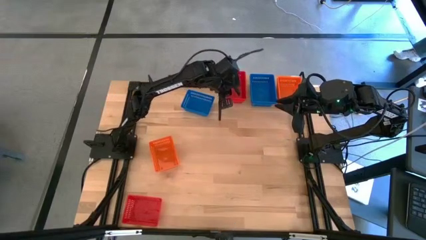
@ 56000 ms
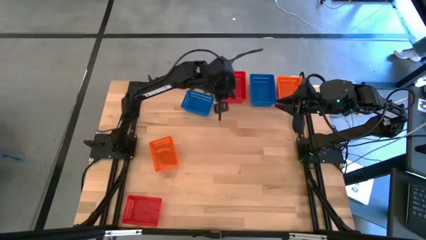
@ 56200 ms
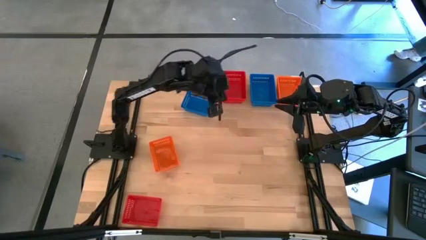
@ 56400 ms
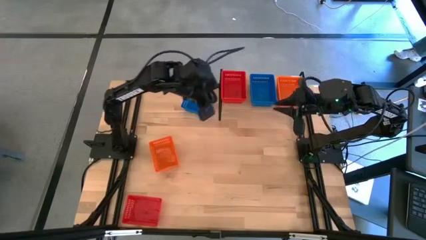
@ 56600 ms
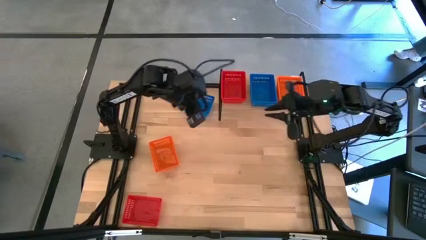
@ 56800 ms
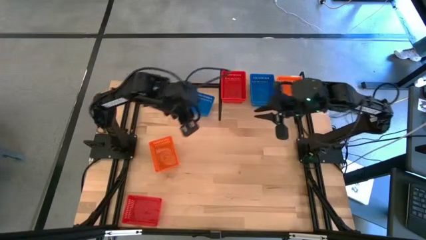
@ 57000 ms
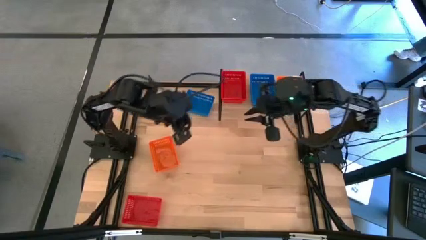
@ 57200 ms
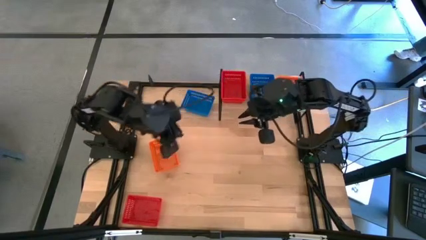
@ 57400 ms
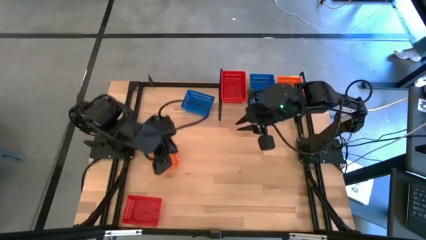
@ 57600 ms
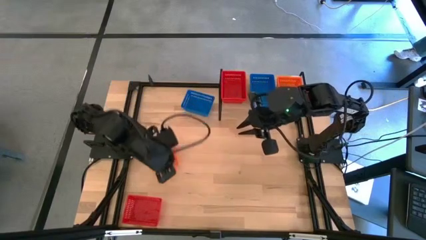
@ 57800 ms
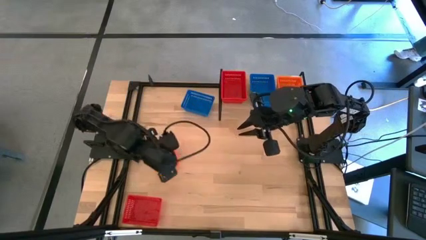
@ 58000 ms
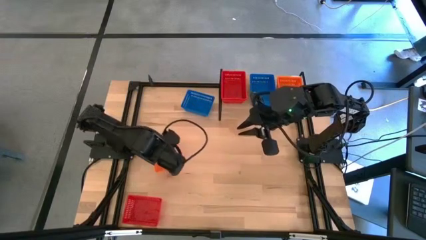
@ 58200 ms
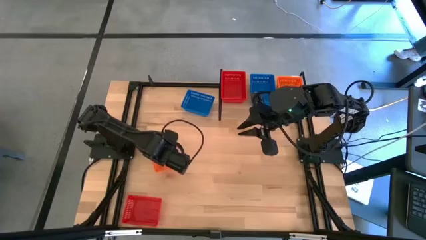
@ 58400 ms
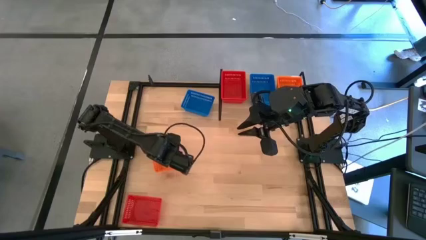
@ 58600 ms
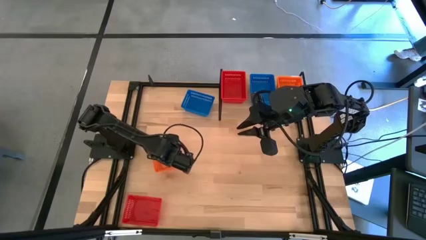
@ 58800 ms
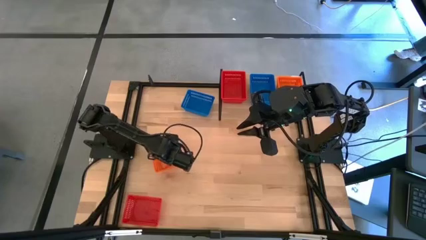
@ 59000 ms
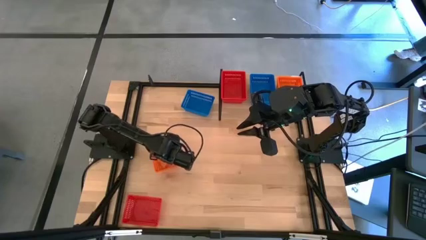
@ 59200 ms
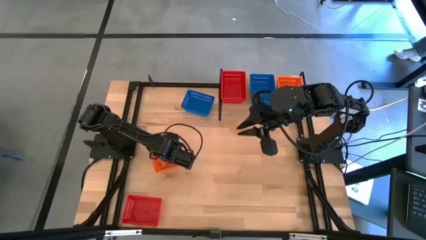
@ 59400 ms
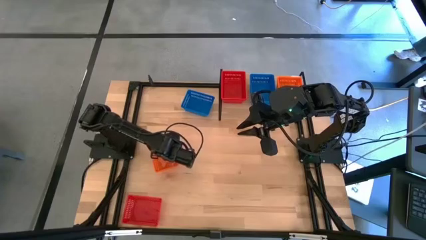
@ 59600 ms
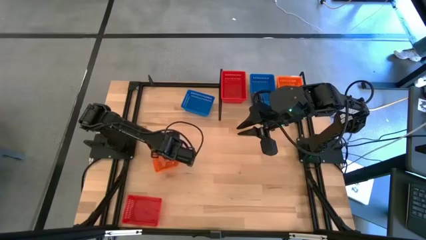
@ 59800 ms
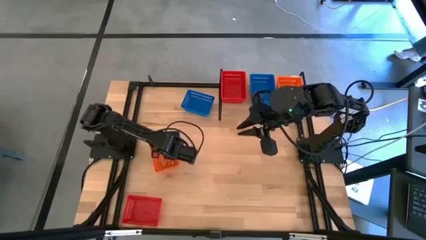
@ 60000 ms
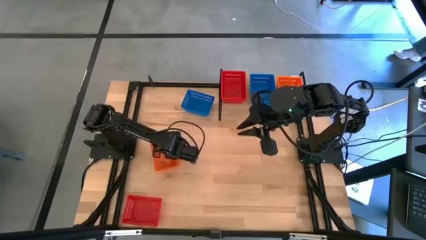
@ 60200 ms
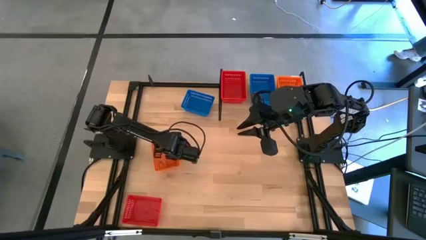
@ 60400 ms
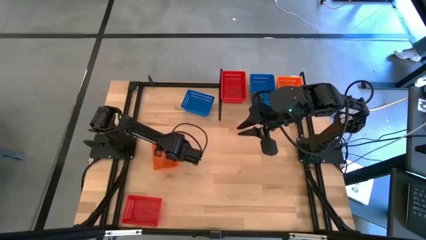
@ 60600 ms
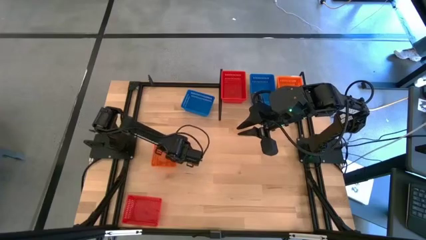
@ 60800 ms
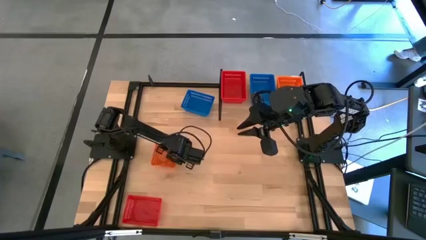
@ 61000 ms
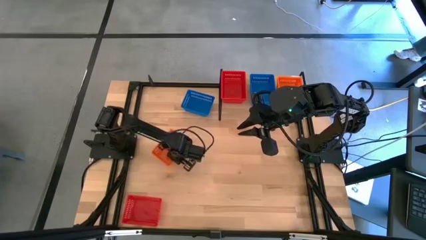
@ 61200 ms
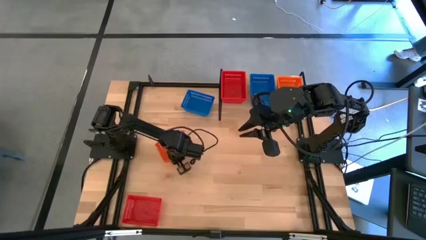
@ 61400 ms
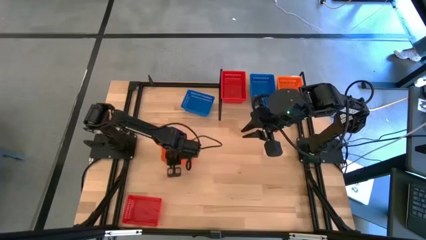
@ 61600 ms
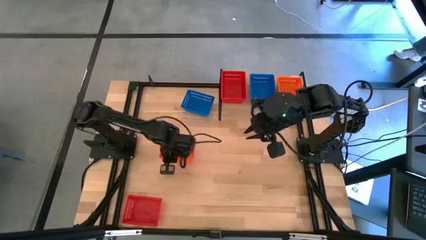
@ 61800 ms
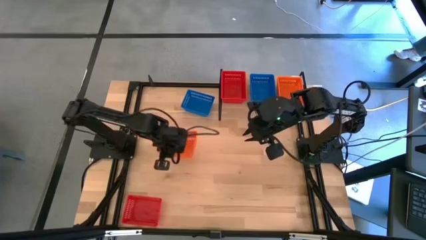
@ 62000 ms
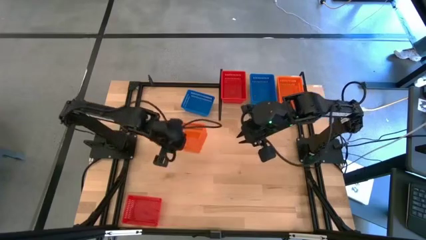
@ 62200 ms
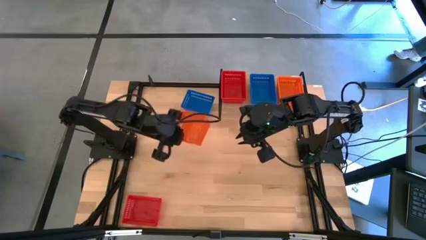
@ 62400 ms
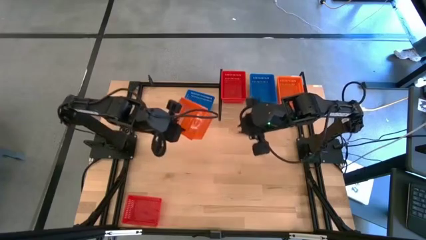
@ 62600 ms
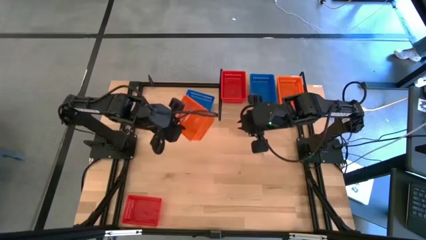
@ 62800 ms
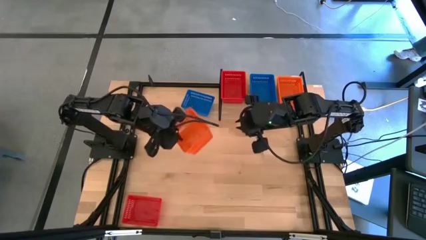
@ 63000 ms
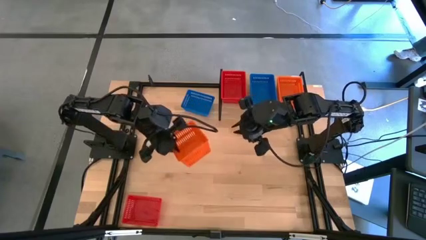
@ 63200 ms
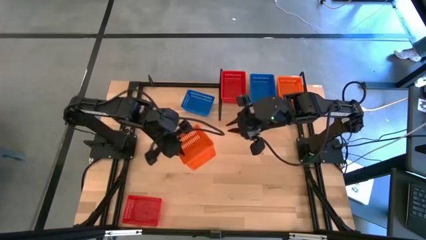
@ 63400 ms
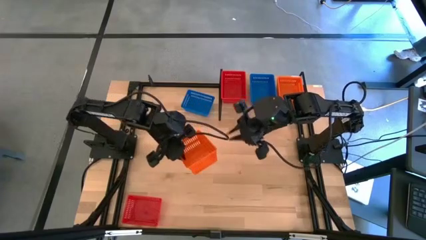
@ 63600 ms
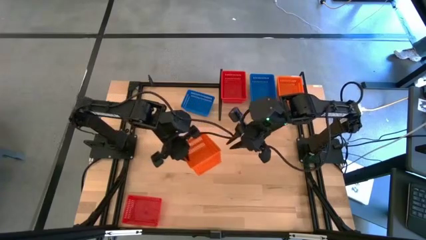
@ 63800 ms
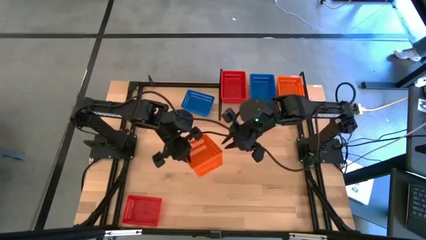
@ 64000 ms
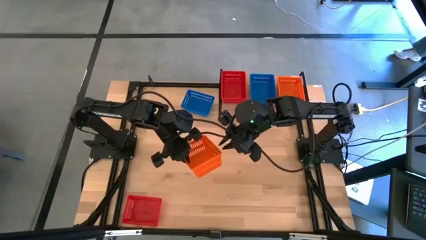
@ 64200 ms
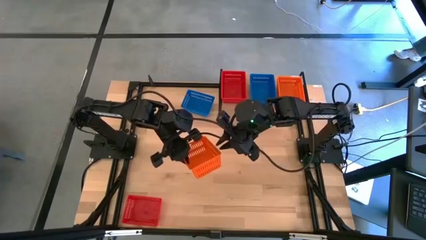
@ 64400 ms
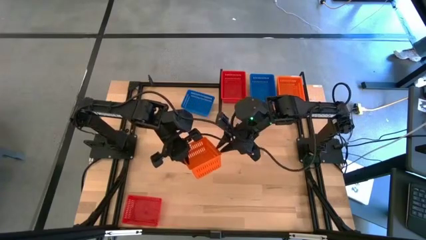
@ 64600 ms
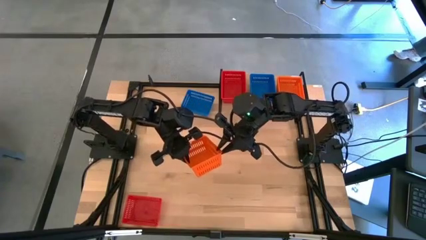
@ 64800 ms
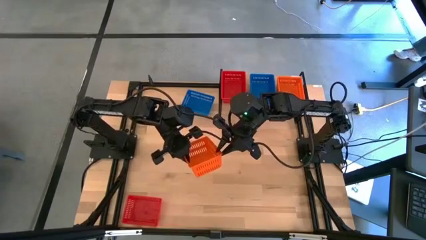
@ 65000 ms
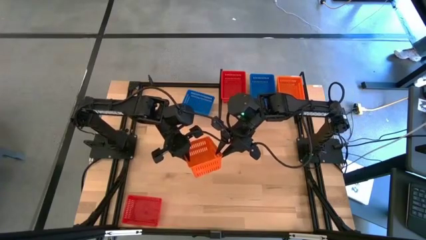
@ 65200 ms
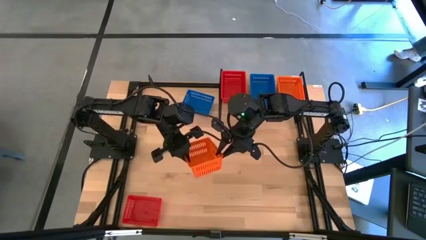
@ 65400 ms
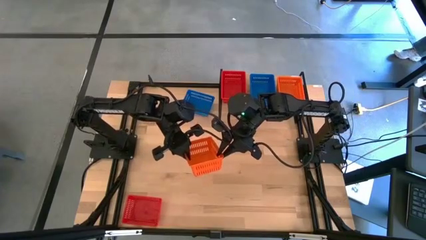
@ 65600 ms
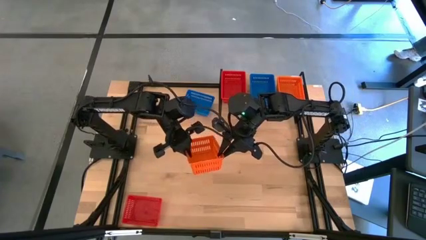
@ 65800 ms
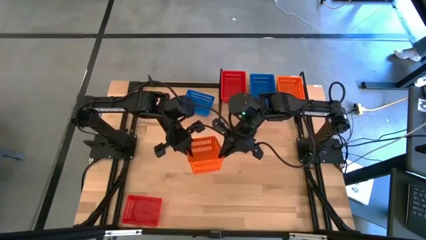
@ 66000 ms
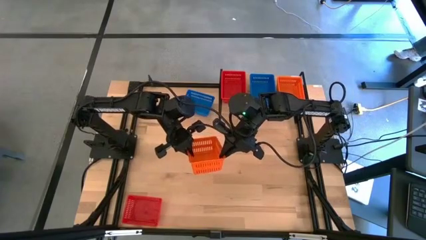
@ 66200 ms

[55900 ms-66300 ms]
Task: Stack baskets on shelf by color
Stack the orange bin on top of the stacked orange bins on the shelf

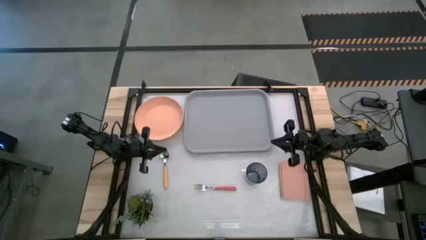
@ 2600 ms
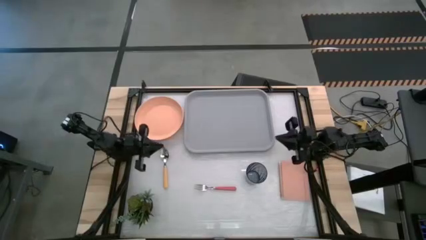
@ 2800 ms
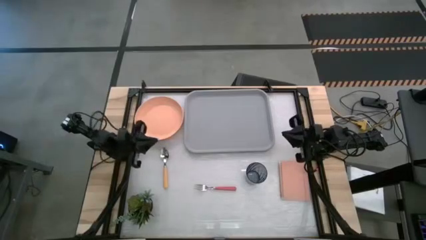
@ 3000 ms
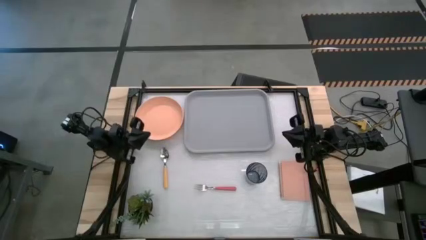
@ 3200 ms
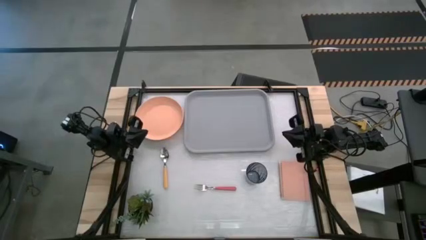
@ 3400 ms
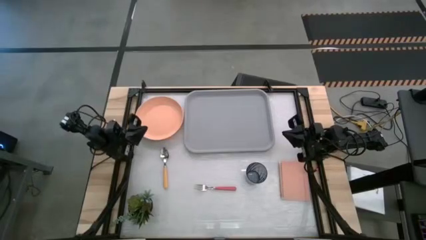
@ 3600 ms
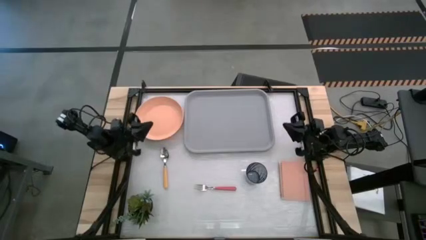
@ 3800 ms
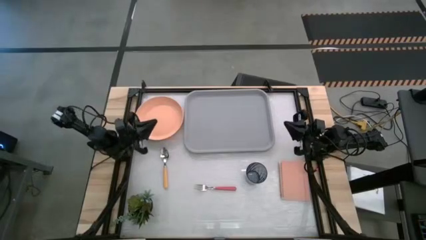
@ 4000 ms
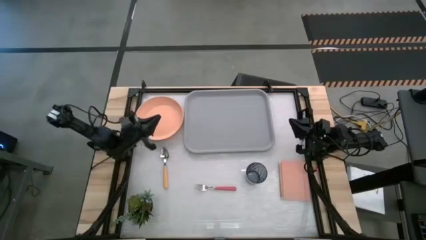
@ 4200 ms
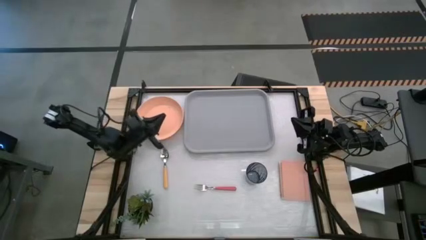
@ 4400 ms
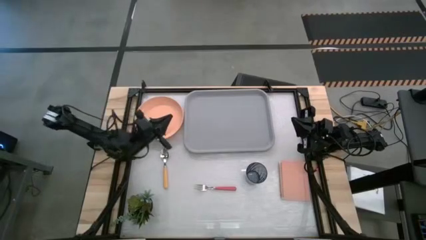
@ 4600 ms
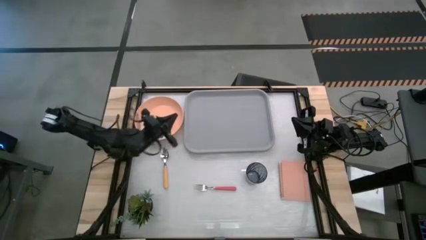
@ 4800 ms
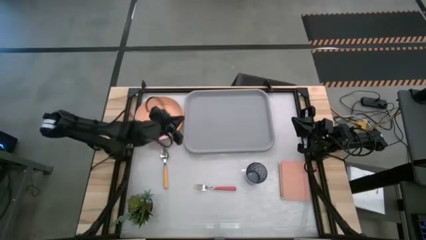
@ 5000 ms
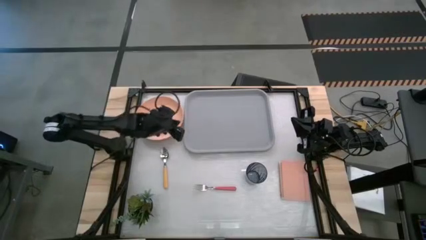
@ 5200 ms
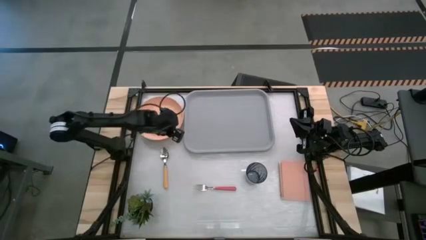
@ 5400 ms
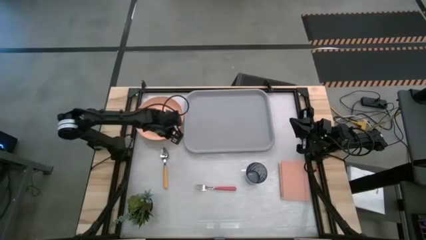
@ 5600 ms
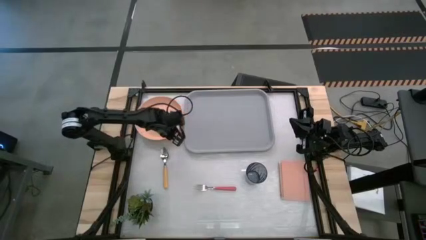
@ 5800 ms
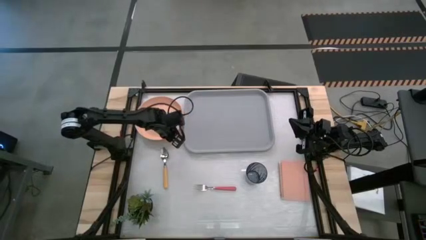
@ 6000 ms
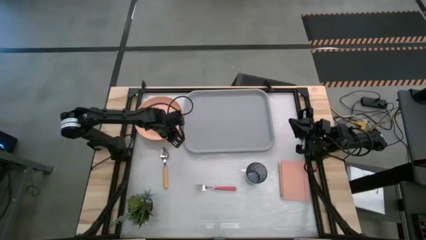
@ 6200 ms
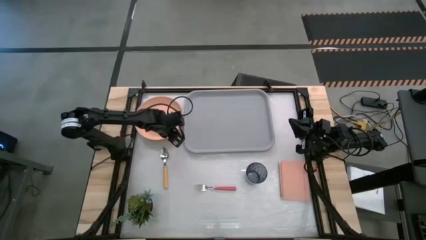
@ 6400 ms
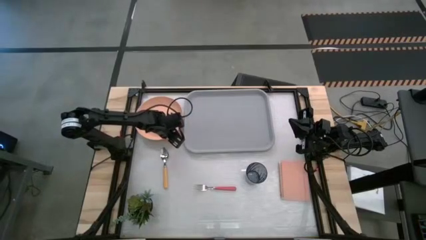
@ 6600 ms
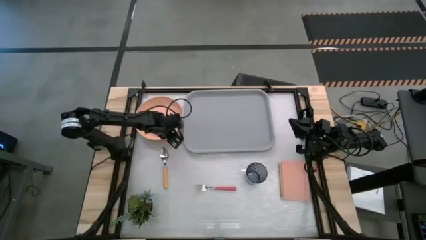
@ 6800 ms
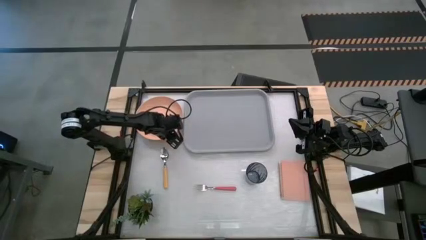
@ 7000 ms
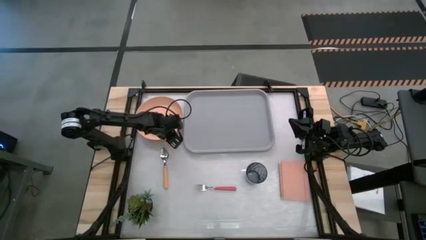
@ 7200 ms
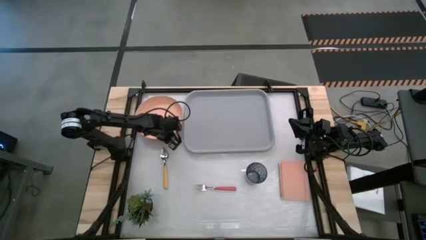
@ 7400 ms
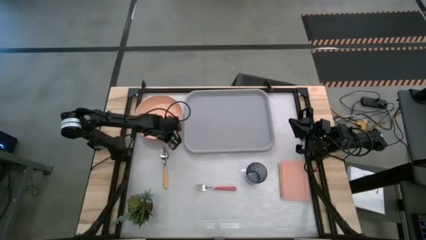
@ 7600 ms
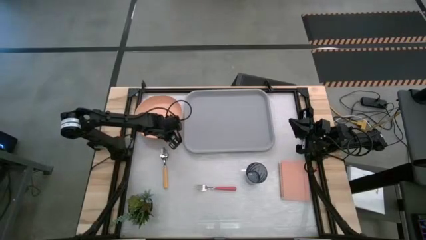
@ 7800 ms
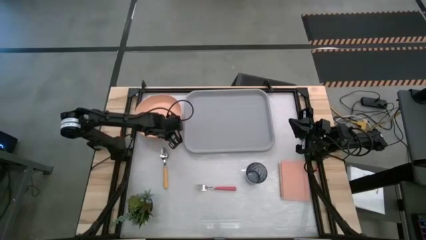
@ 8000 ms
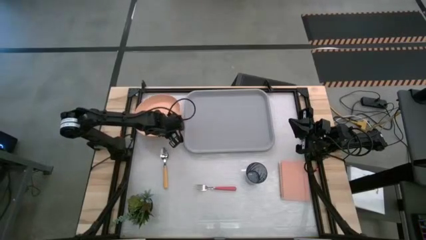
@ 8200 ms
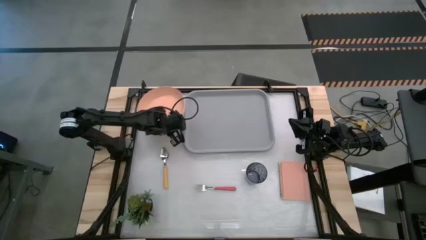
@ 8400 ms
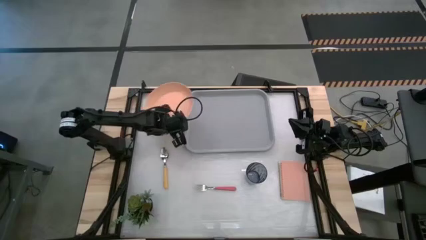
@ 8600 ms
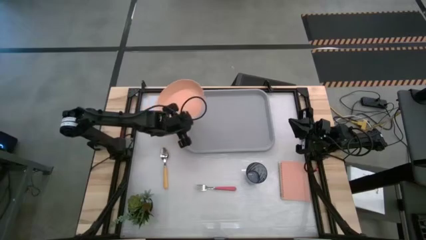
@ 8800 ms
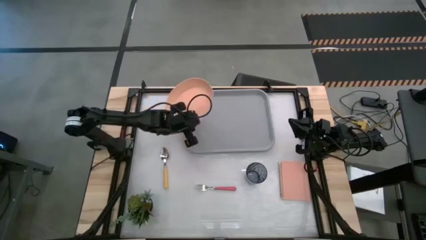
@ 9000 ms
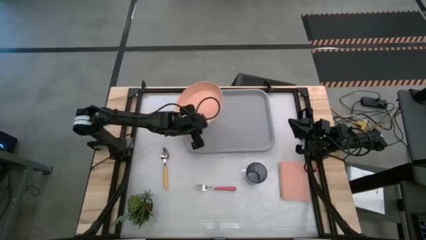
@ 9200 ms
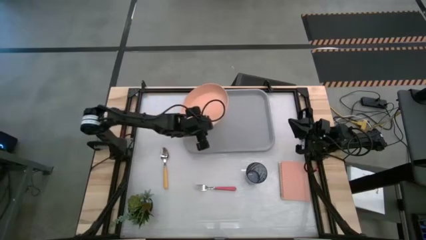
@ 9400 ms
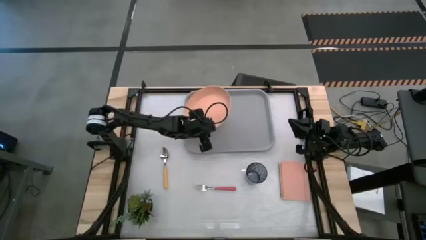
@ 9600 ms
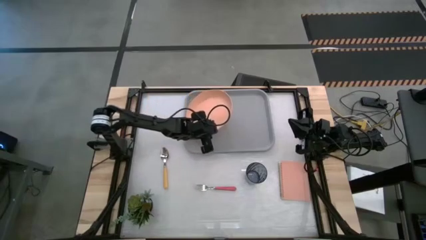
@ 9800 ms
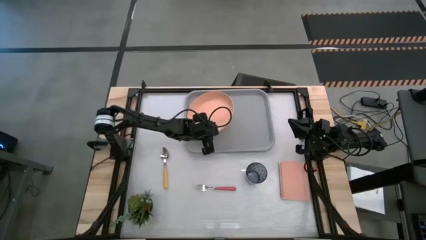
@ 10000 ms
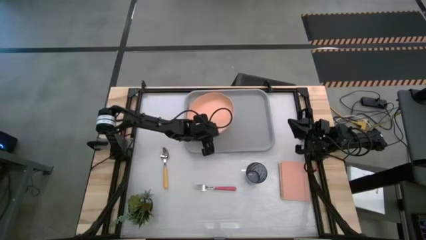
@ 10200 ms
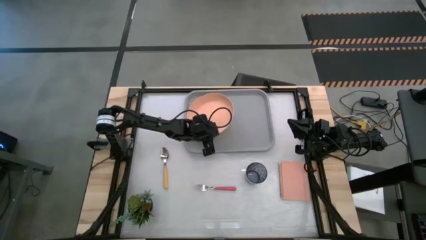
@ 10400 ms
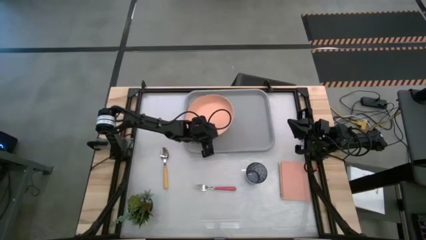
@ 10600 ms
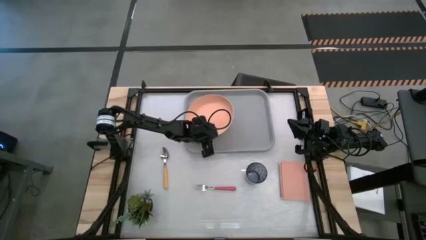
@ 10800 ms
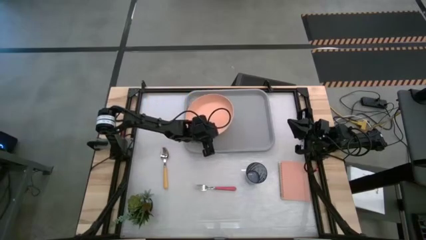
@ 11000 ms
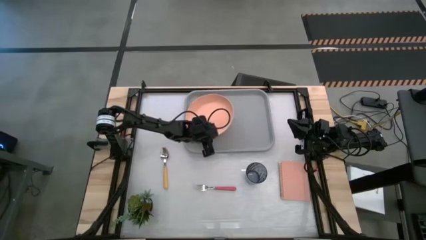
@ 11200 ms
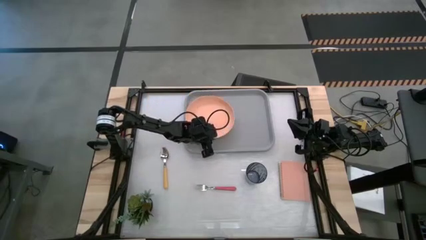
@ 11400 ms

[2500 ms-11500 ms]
Task: Pick and place plate/cup/fork/spoon on tray
Put the orange plate on the gray serving tray
